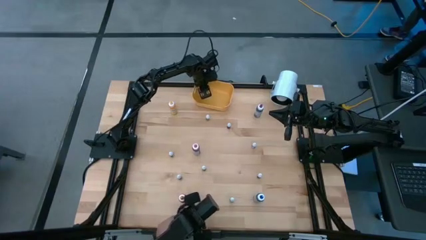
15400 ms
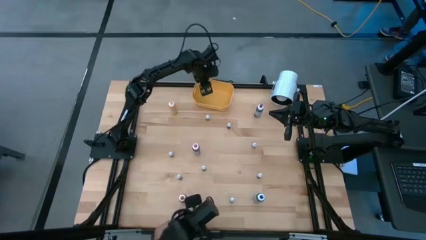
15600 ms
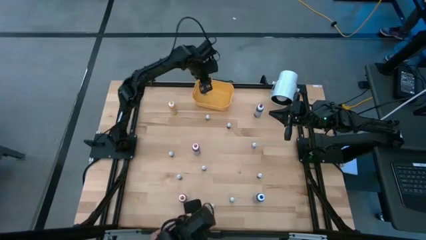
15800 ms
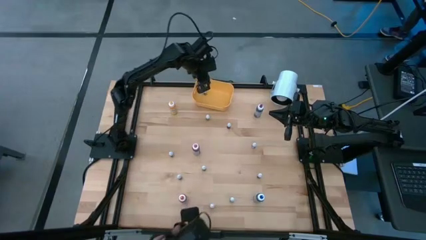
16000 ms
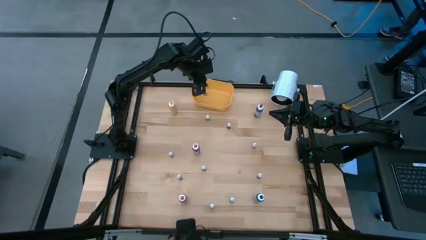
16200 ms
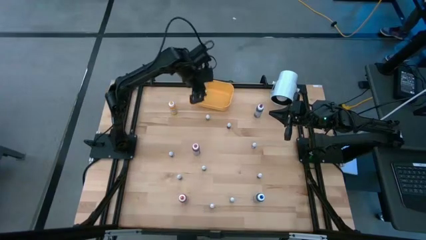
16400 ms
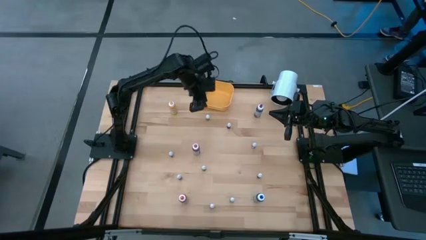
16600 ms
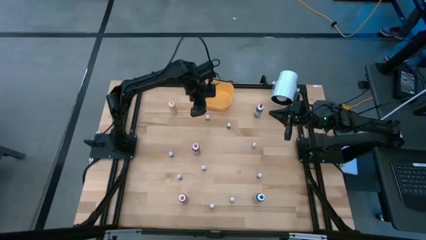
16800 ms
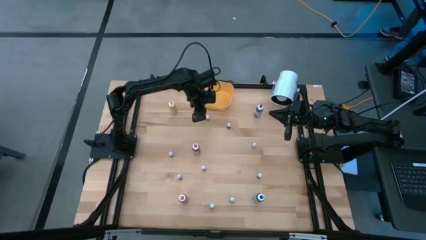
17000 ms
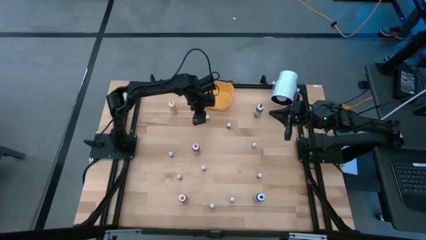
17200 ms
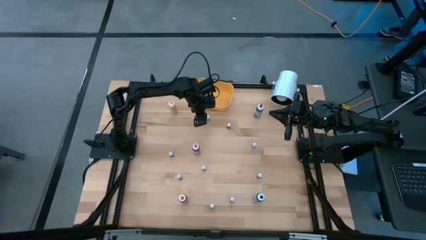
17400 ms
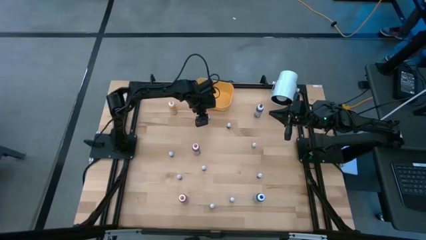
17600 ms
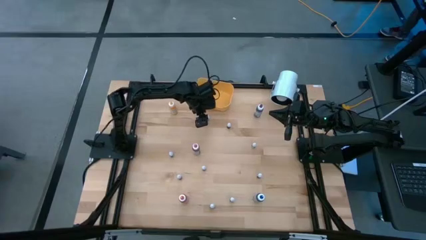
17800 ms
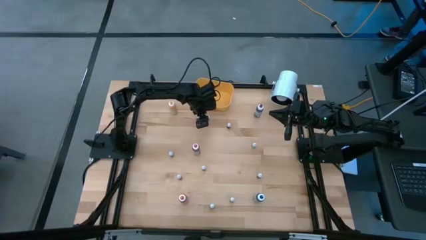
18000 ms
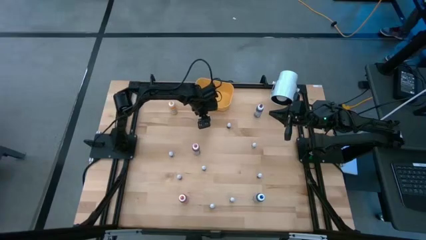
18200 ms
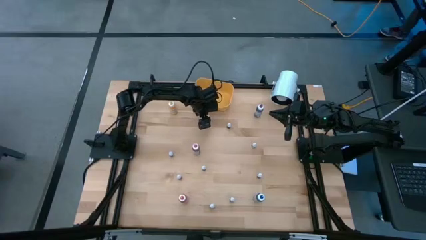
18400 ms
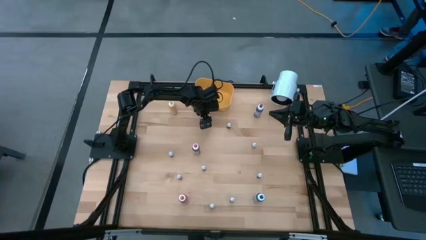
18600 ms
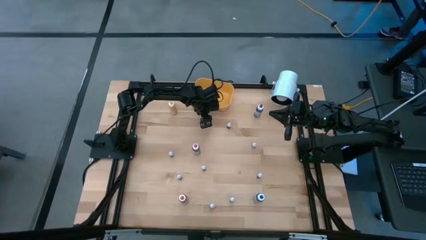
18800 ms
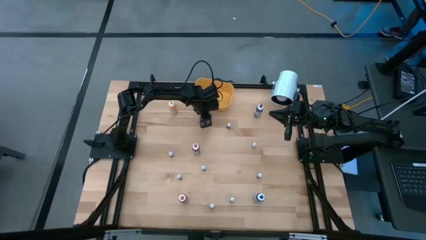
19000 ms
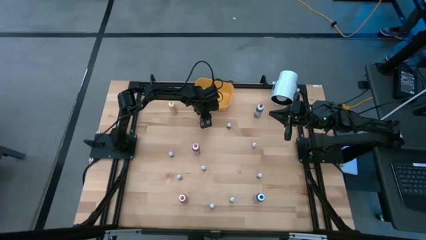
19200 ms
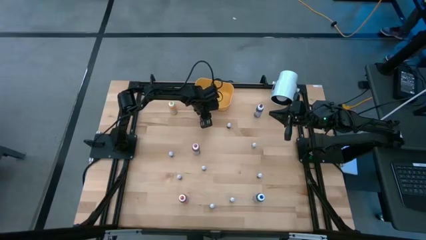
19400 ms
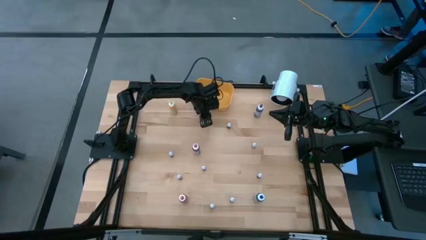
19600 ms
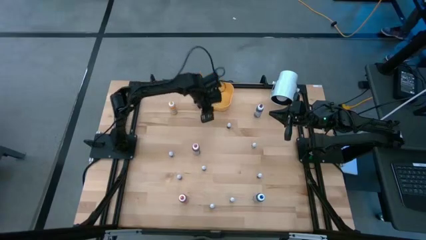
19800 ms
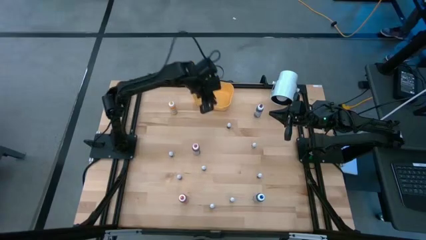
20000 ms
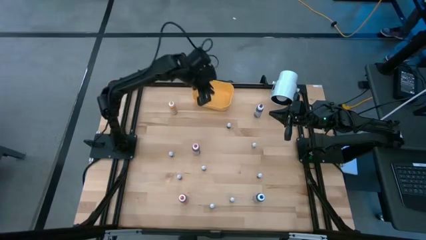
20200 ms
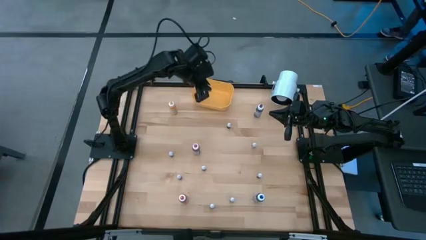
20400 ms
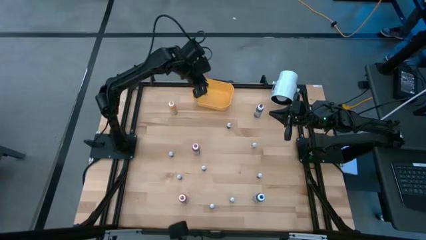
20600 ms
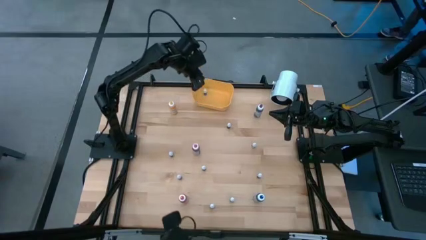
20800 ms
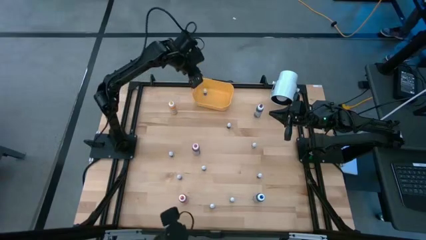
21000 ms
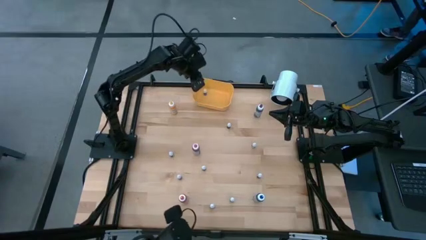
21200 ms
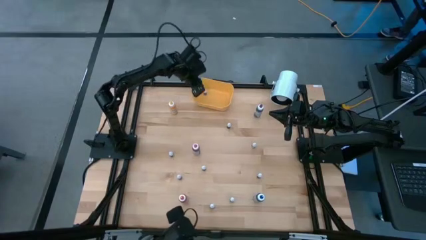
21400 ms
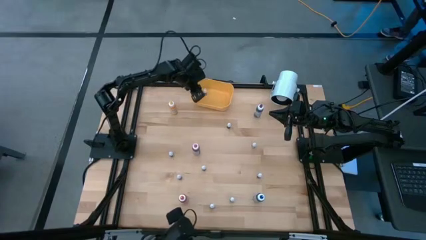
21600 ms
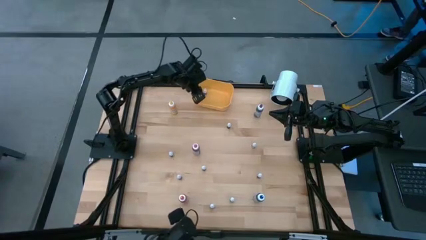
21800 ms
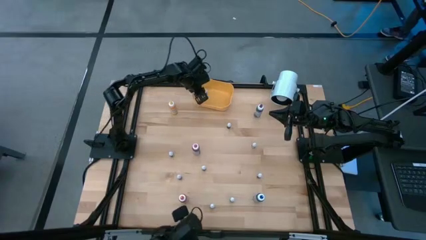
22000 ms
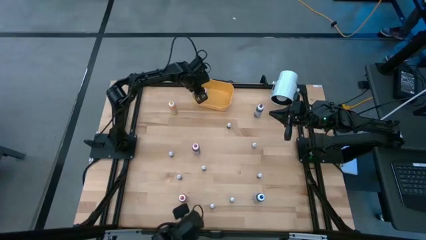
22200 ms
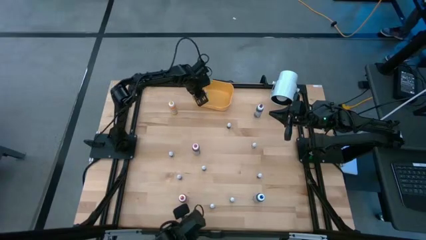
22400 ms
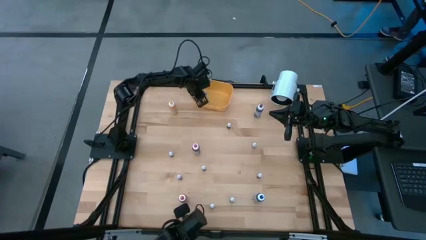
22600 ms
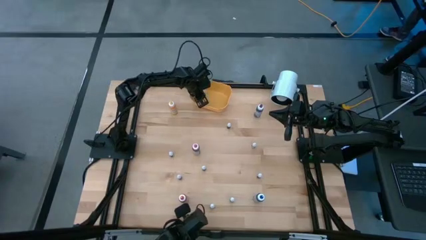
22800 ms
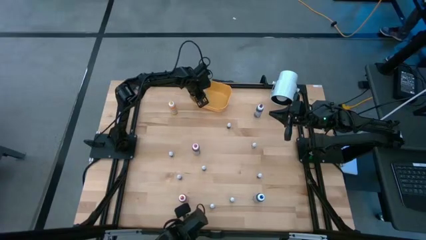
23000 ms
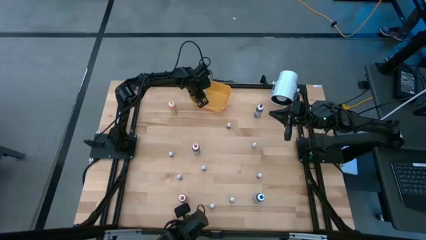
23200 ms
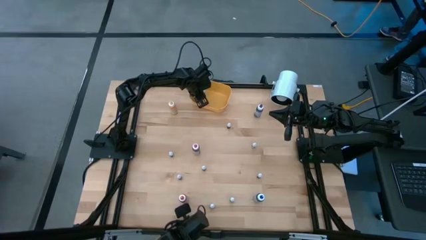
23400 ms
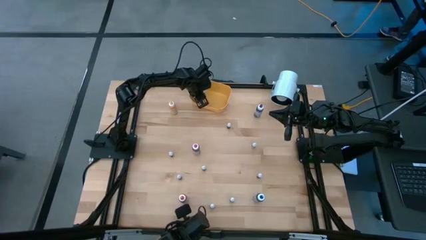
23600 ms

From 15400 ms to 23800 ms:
Task: Pick & Place food coloring
Put the small green food coloring bottle into the bin

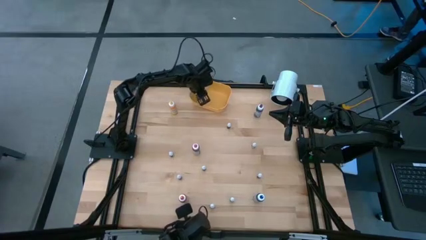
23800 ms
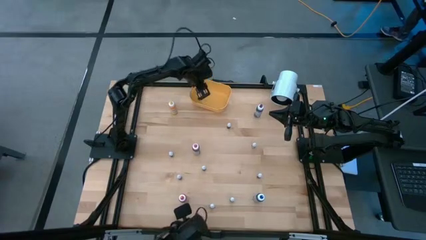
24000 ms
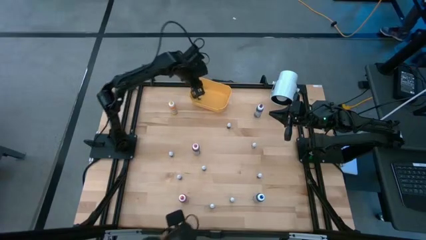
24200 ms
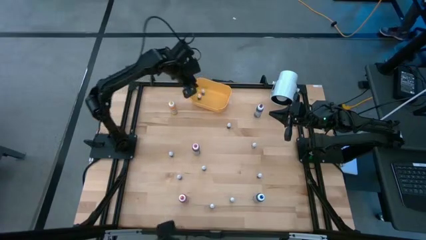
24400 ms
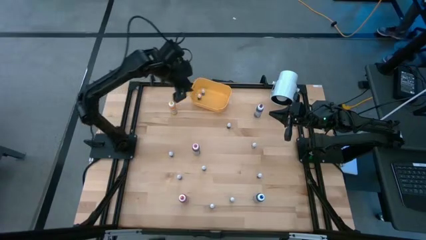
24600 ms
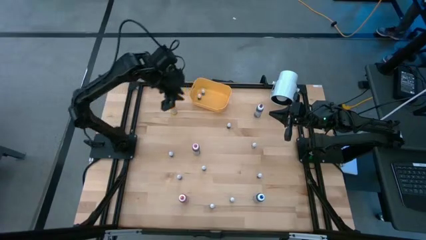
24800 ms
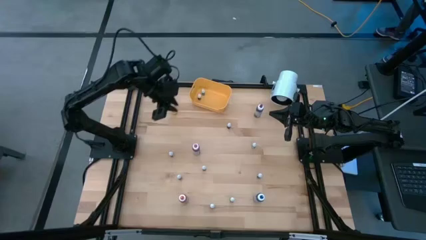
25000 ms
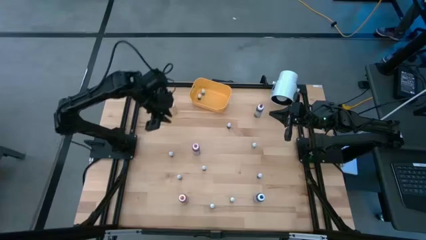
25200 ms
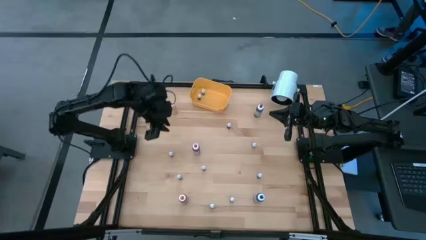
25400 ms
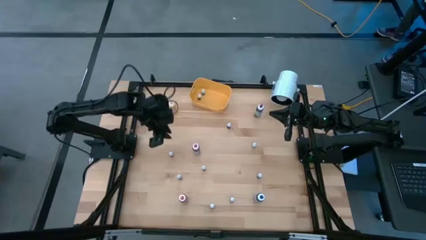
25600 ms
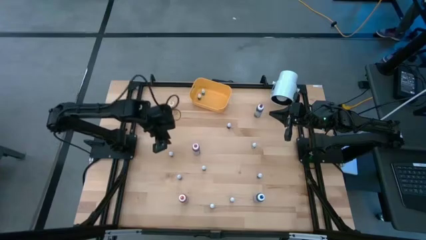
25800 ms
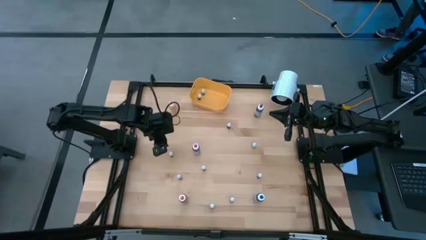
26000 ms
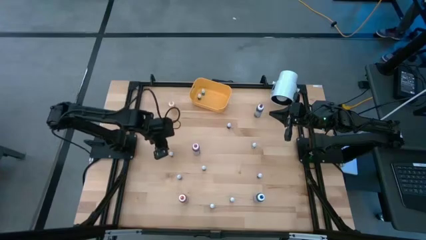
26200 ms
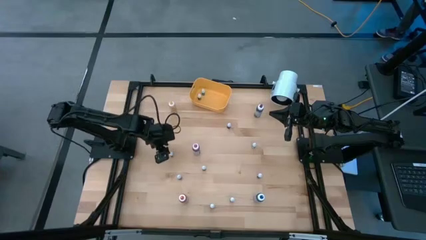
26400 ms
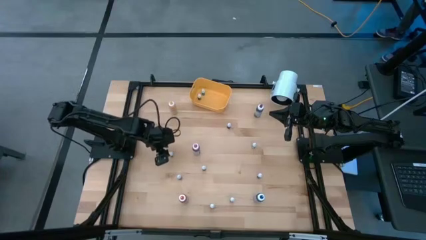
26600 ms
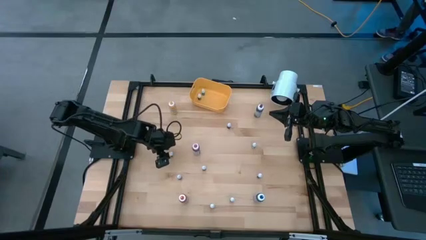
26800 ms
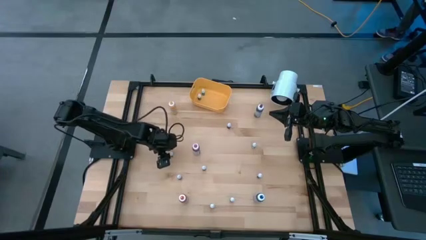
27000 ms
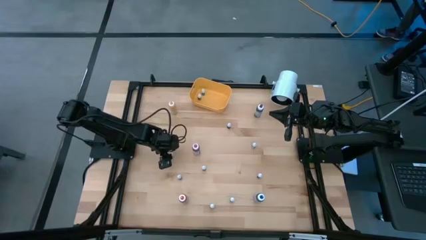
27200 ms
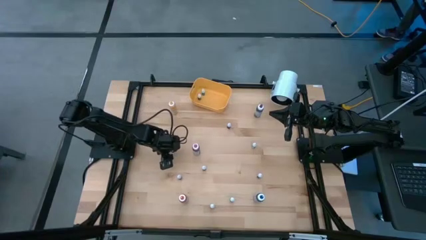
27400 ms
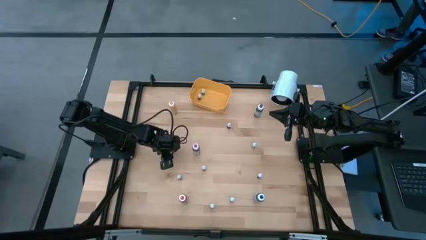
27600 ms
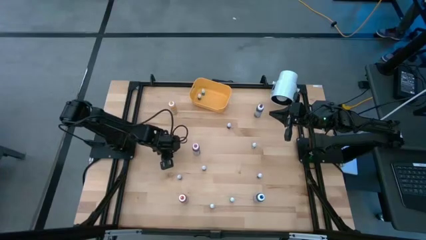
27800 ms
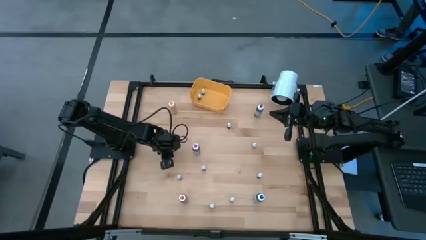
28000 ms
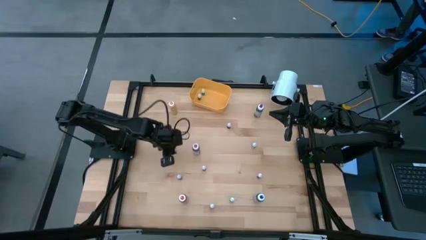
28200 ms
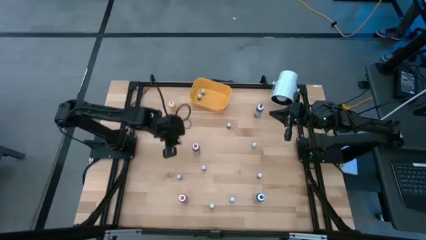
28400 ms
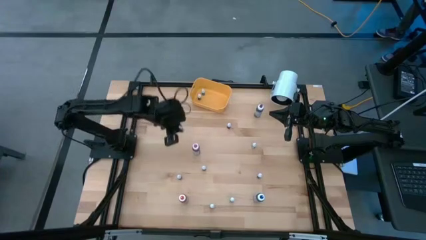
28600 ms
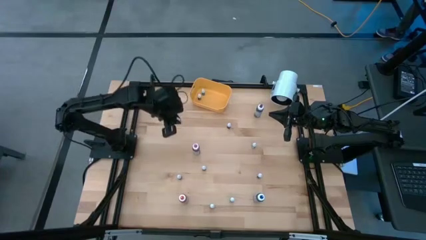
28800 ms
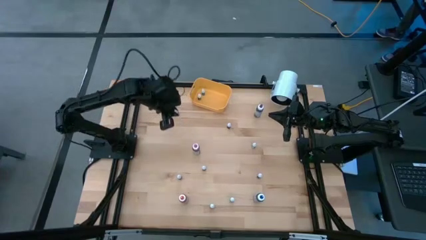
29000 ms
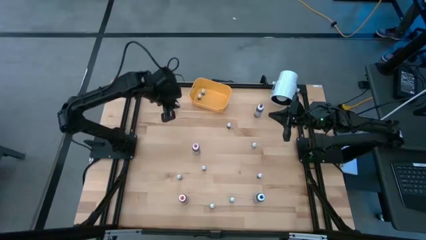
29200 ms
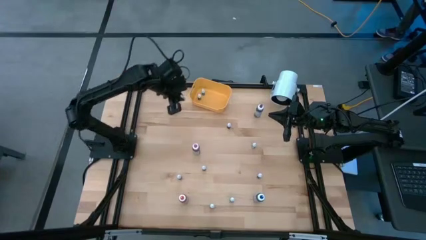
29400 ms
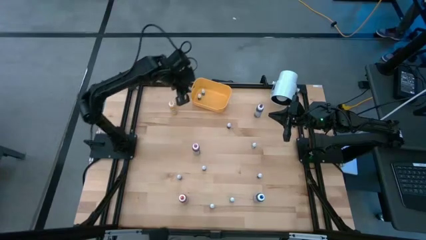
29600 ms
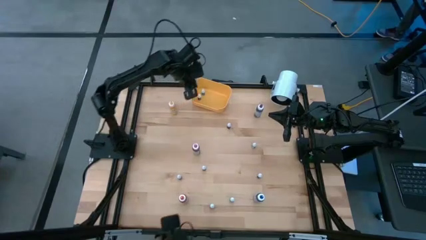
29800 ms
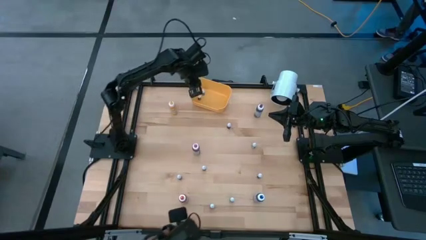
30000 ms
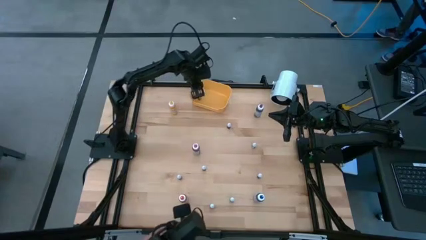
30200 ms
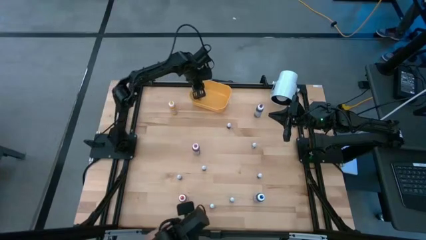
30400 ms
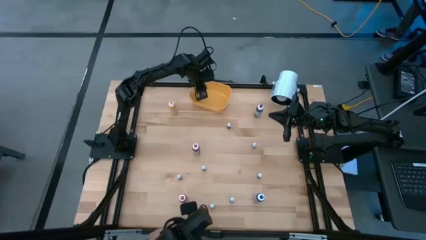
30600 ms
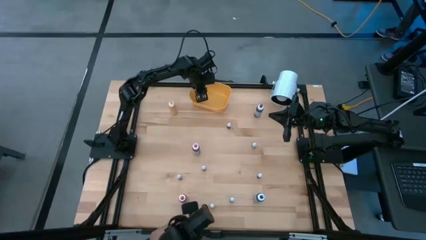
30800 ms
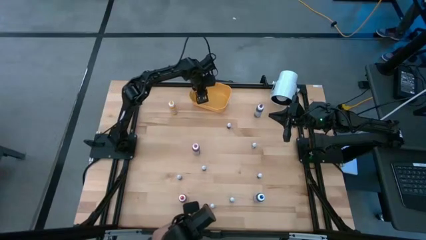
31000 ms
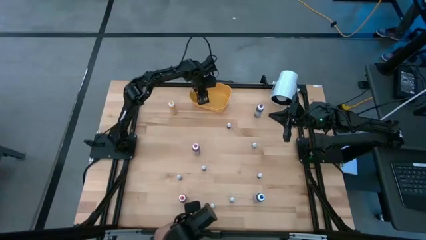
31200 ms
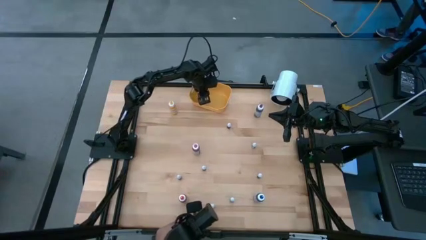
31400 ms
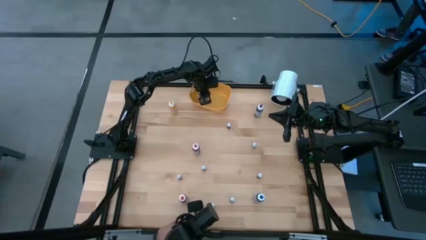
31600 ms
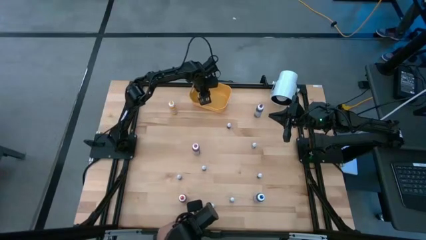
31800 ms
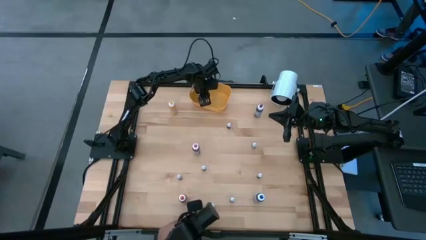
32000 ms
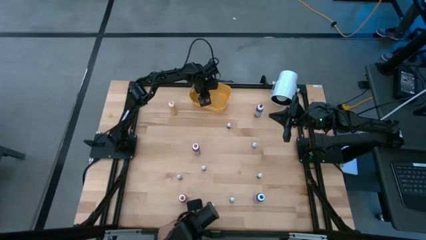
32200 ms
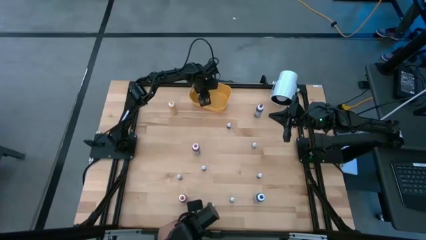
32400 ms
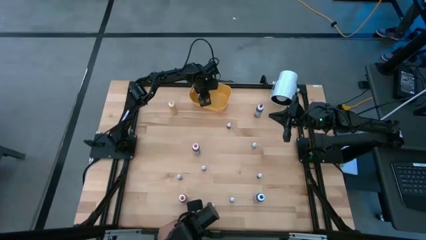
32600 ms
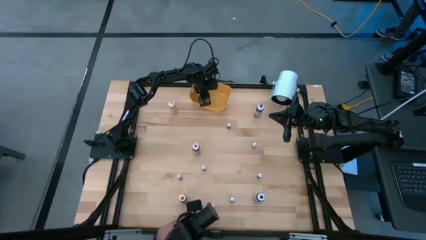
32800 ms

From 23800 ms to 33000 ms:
Put the left small violet food coloring bottle into the bin
